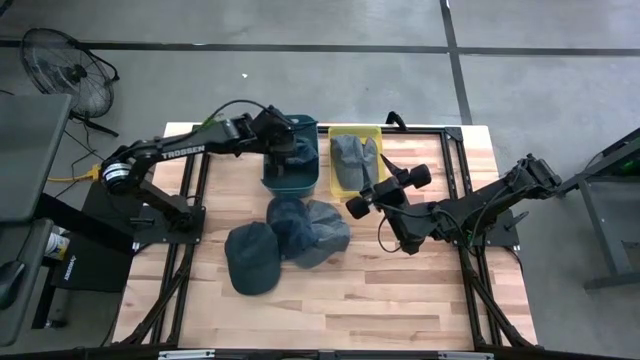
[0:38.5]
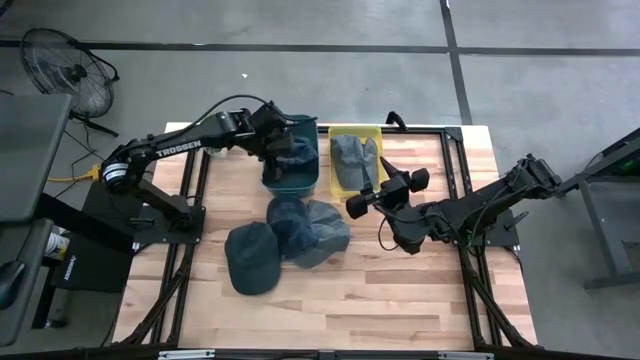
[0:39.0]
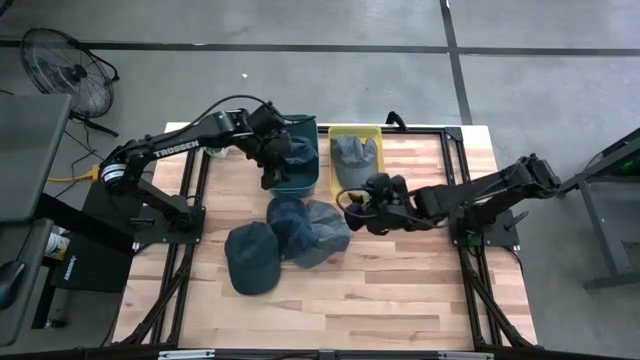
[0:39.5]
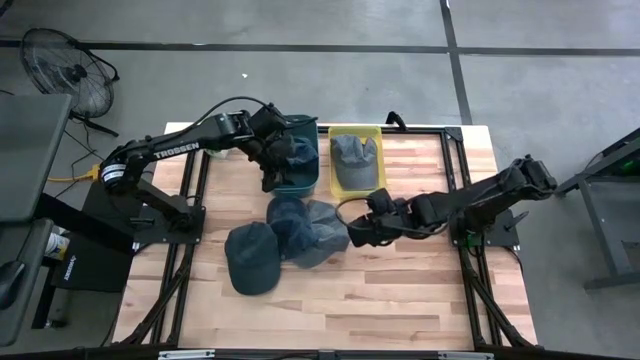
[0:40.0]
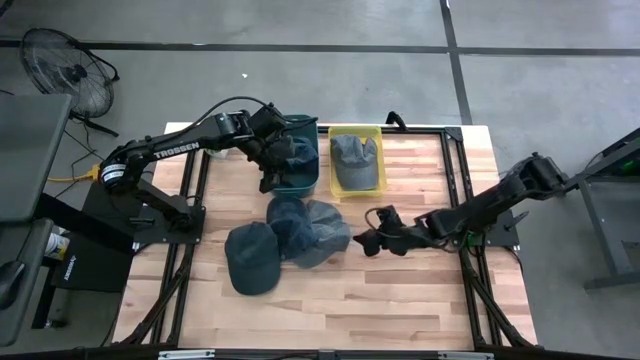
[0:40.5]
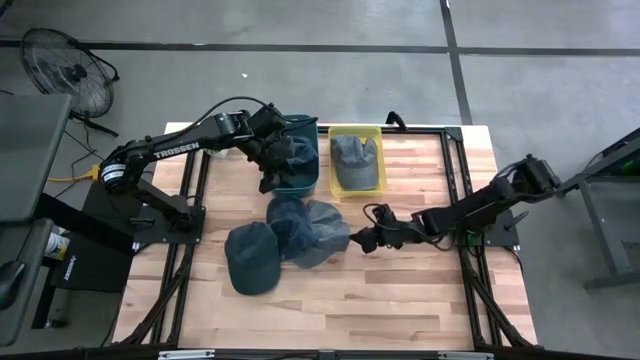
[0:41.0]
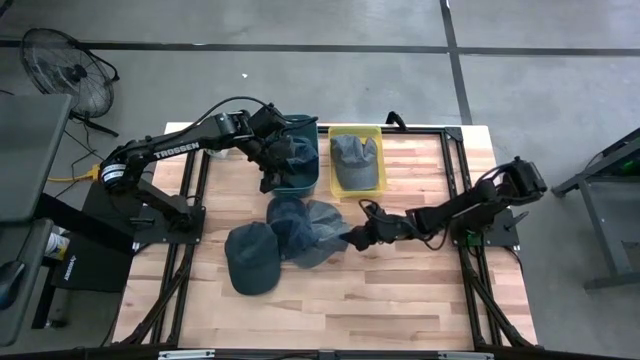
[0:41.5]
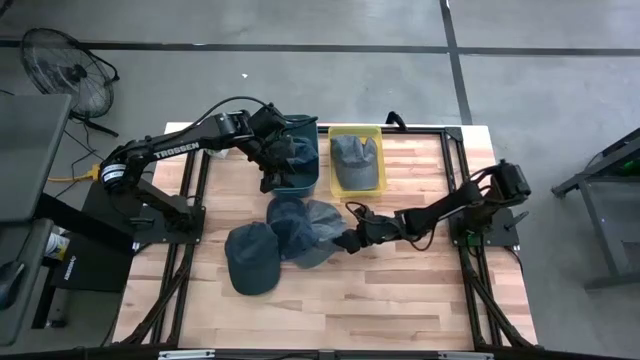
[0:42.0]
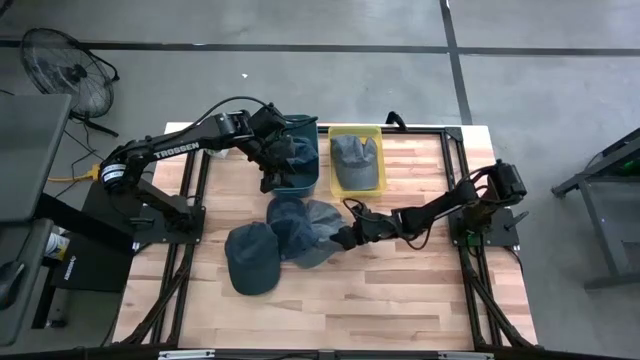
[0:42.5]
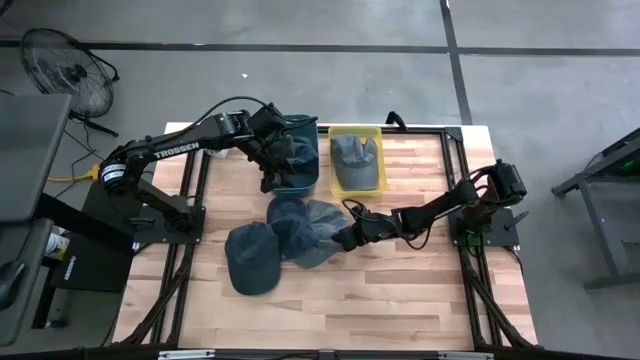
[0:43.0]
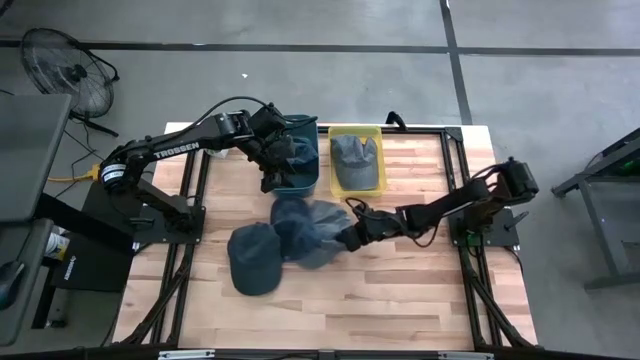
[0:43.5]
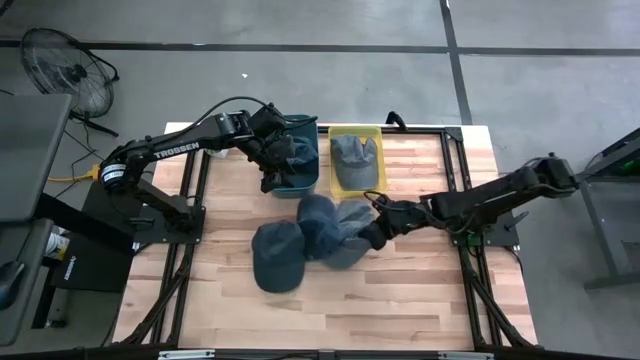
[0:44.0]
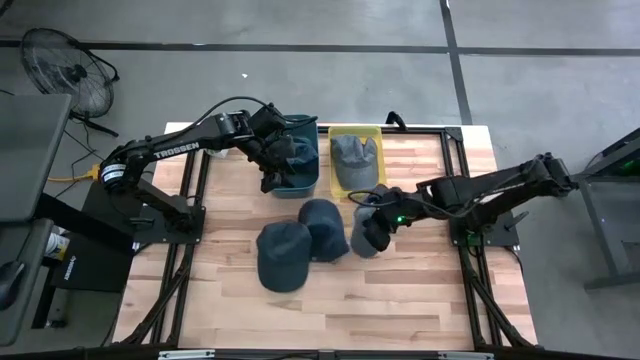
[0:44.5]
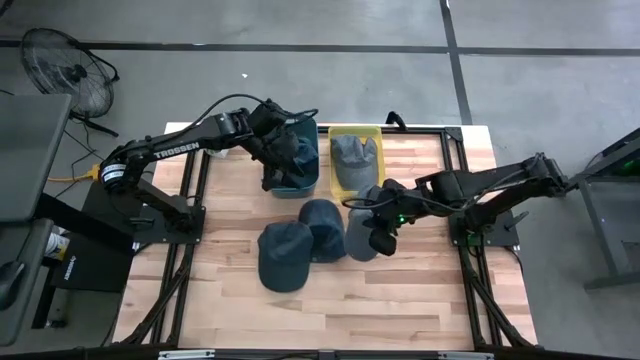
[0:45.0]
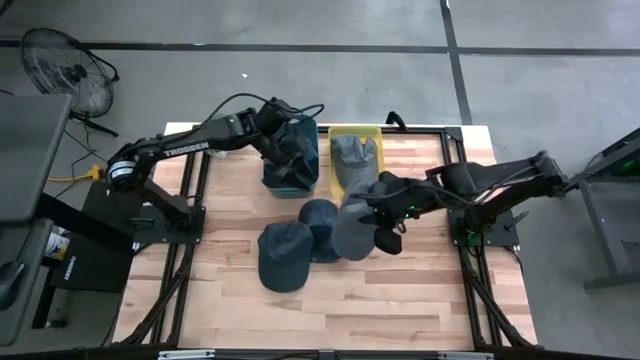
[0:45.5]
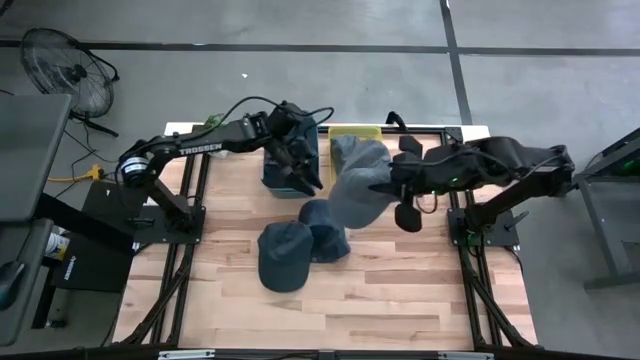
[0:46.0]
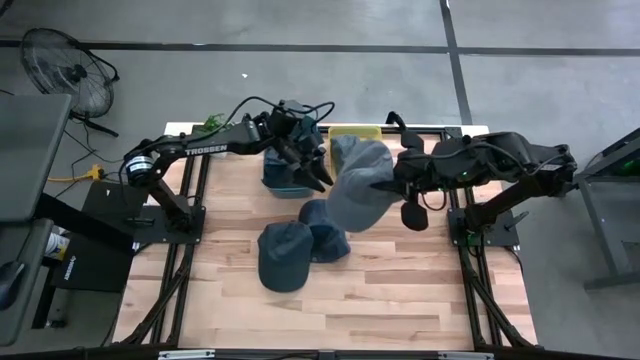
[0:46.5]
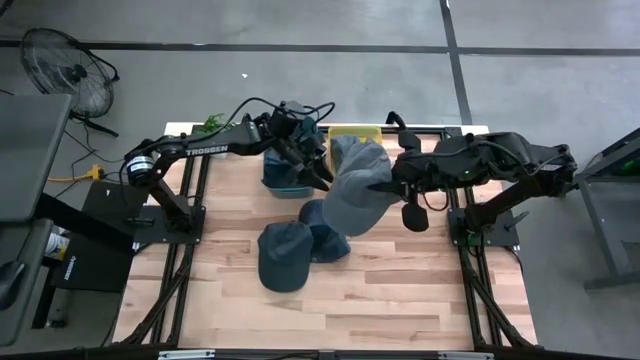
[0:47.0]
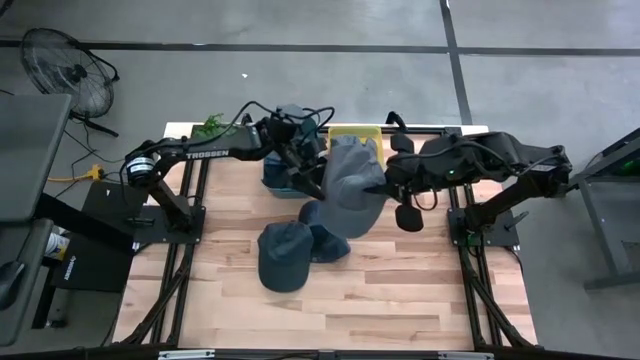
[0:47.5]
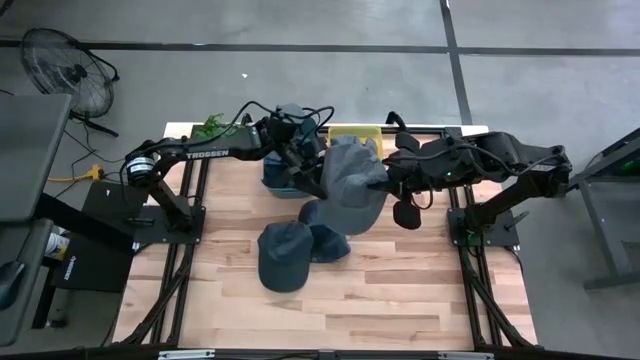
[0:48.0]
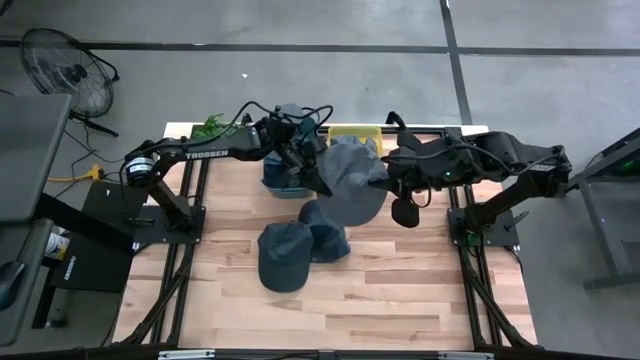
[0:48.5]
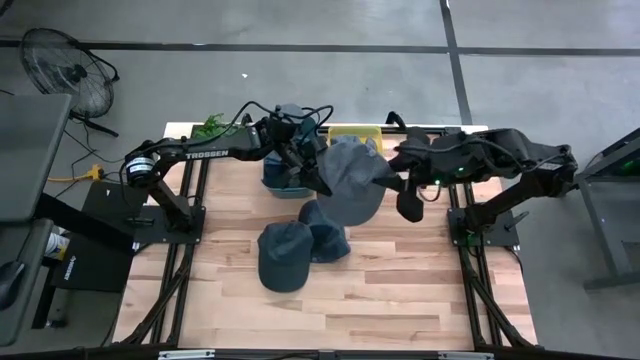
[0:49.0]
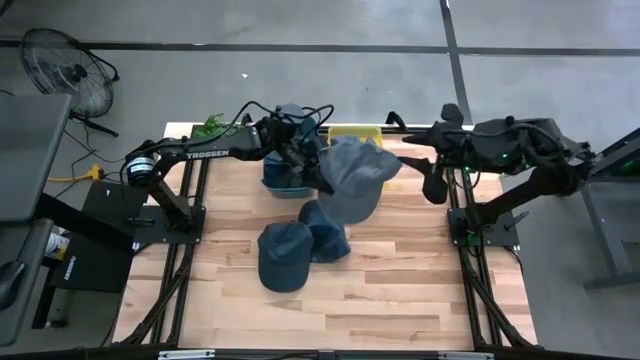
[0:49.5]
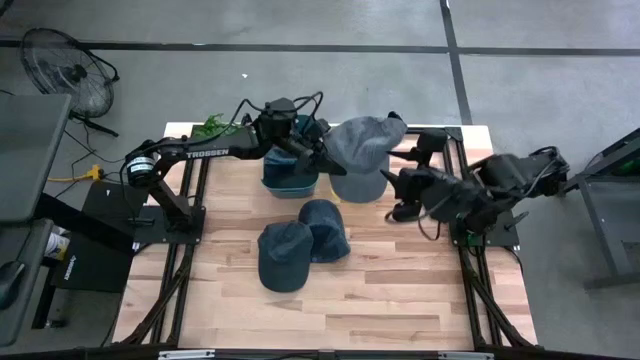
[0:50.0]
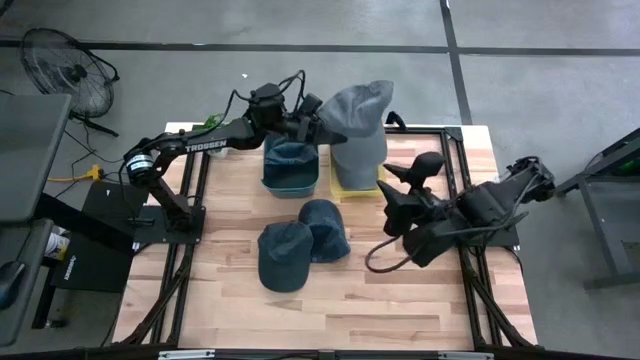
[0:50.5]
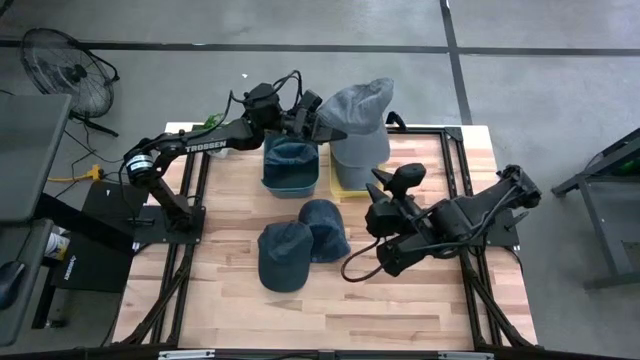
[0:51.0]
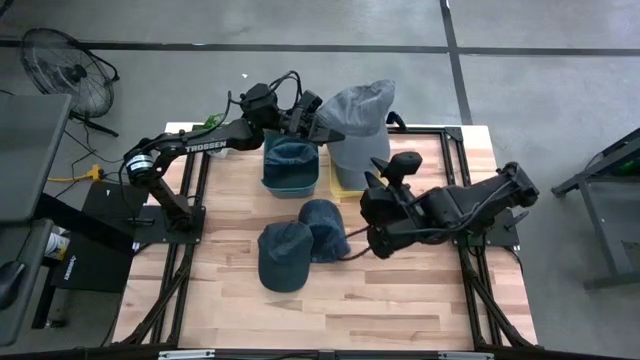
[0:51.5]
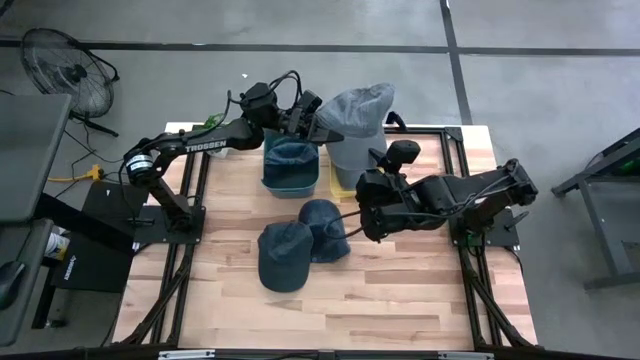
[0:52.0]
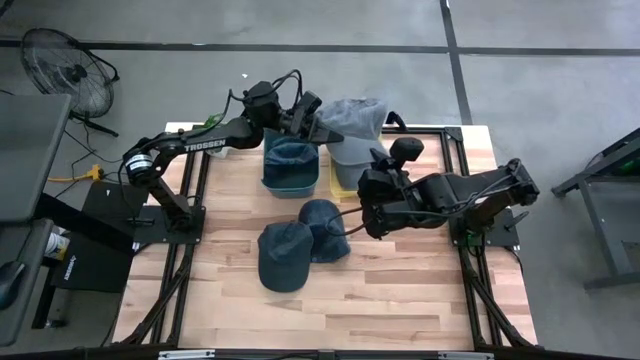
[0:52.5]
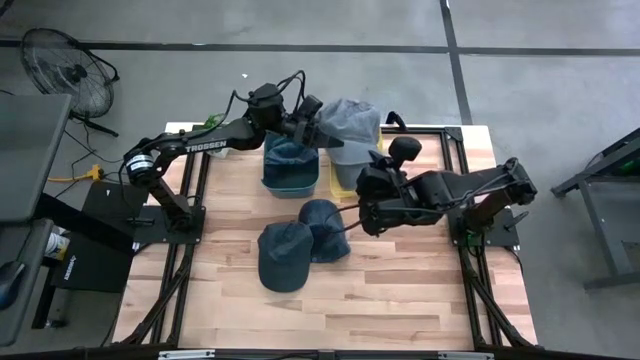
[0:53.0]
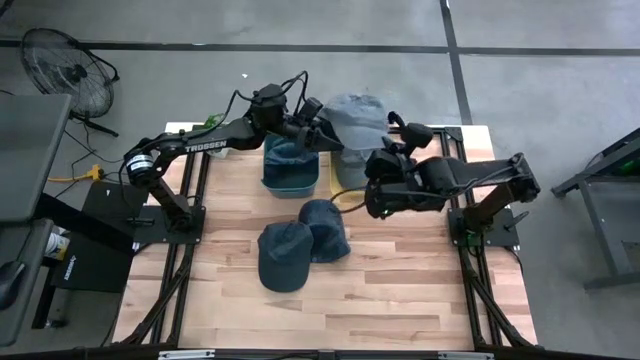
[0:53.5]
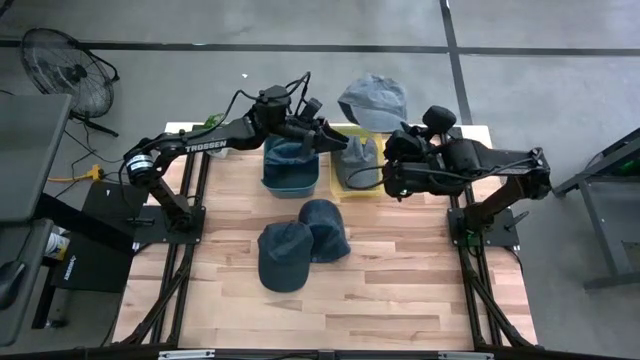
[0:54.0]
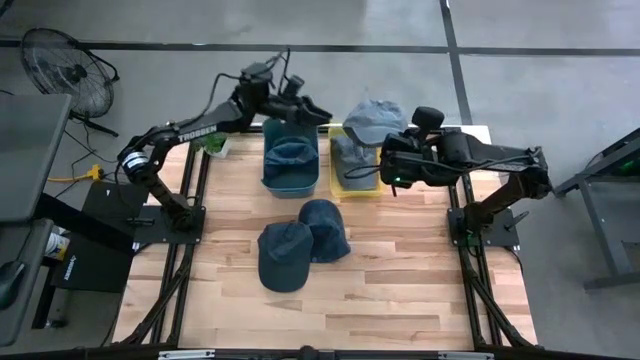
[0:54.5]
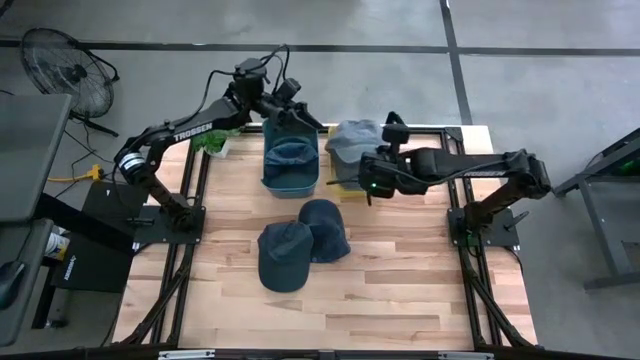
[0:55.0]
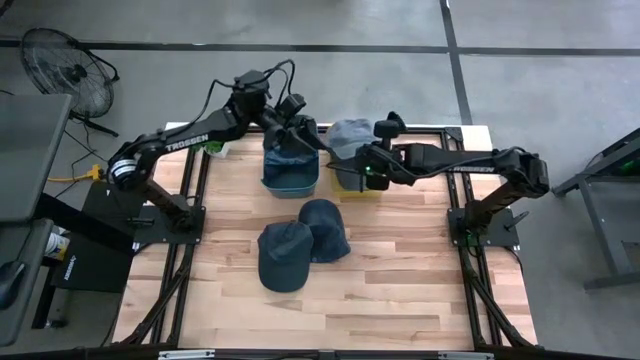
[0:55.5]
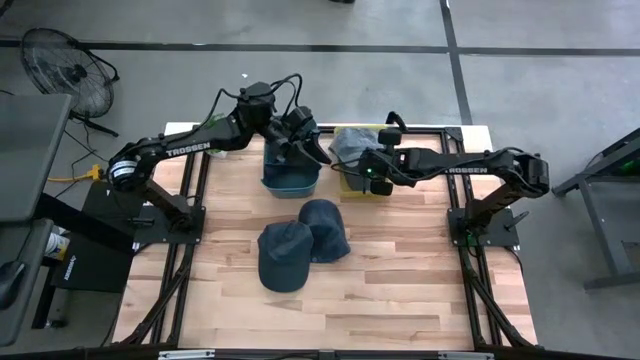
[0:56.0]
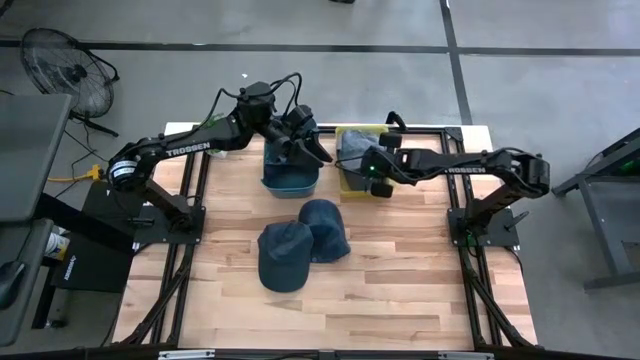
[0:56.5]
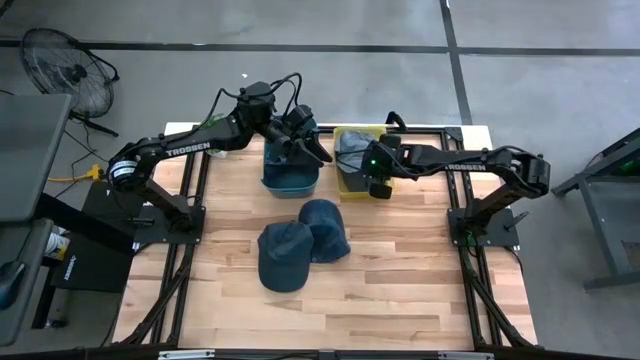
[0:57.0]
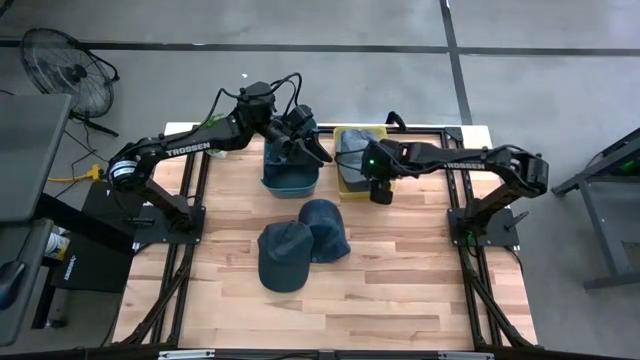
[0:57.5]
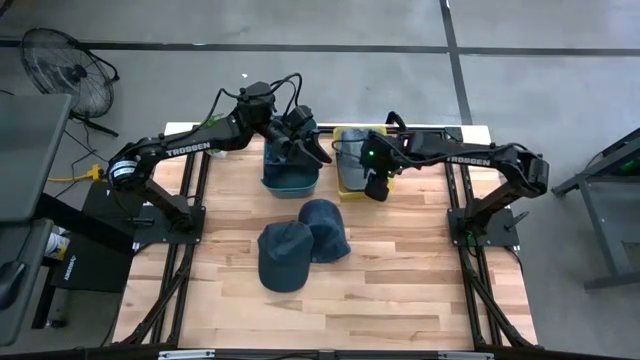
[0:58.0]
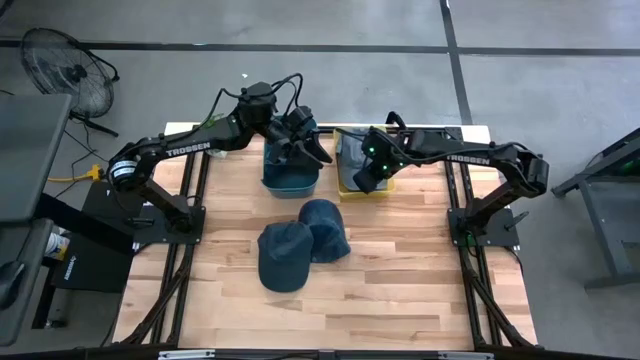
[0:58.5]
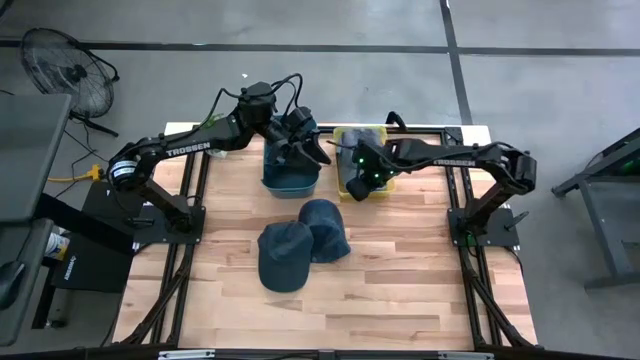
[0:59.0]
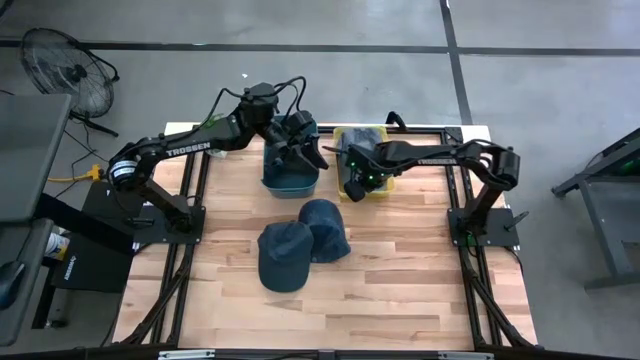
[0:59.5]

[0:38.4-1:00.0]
Task: Pick & Place hat
Put the gray cap into the yellow bin
